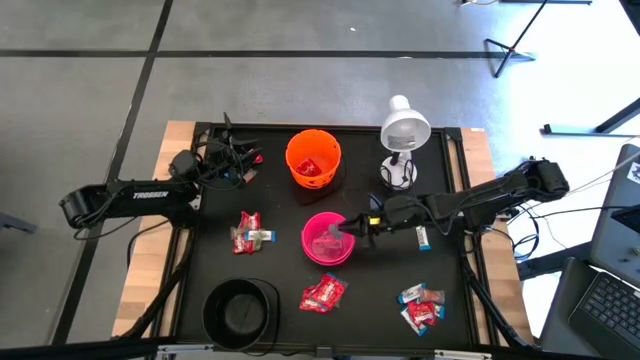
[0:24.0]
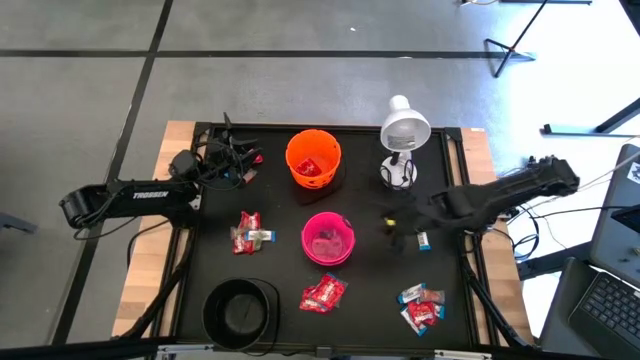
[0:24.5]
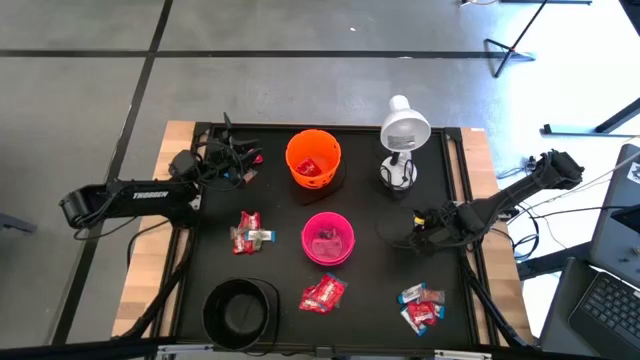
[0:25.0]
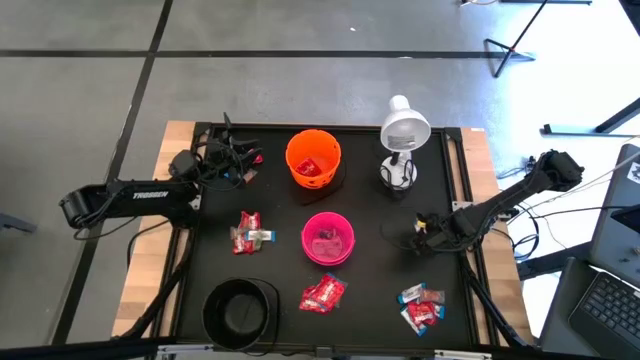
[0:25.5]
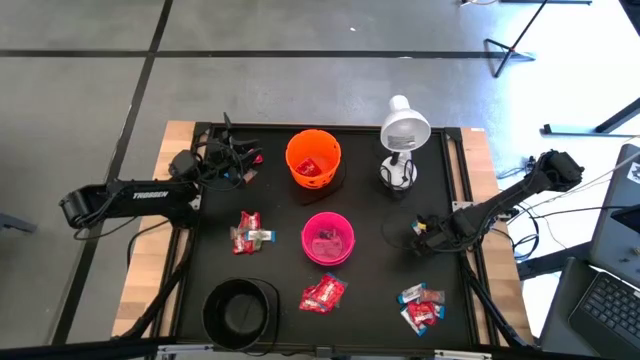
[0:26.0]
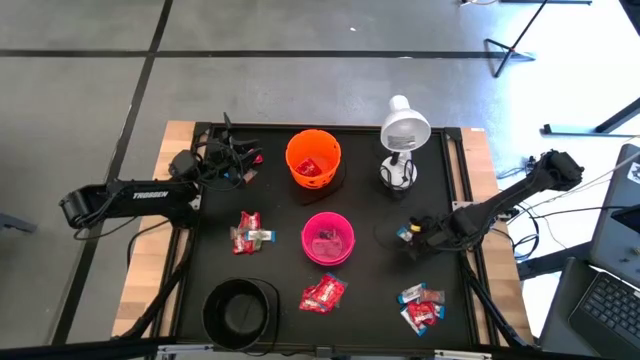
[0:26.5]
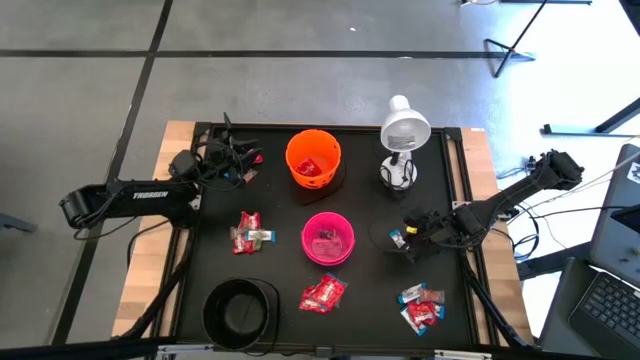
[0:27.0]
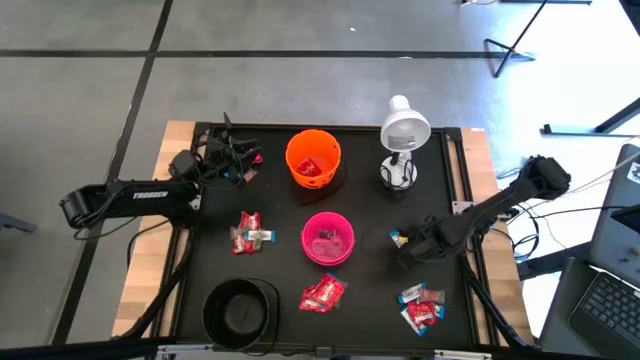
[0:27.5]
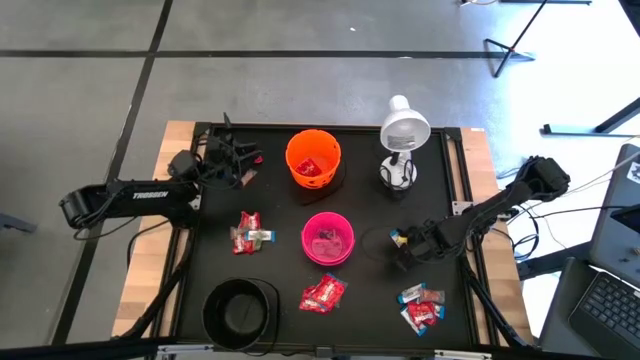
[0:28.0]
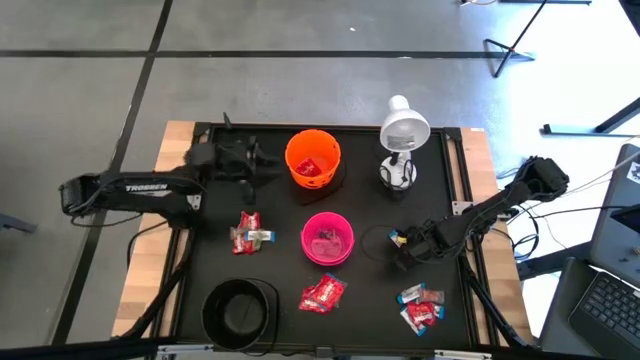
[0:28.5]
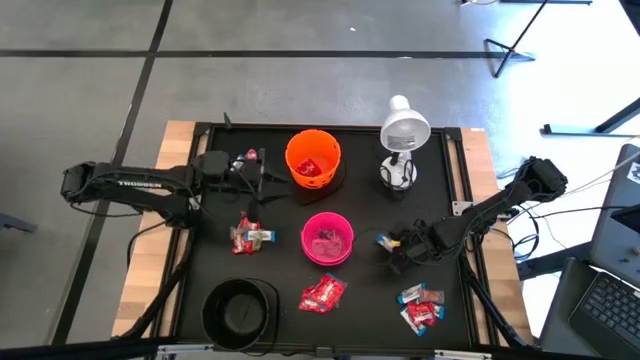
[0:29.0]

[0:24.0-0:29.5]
Task: Sort candy
Put the white chocolate into the black bucket

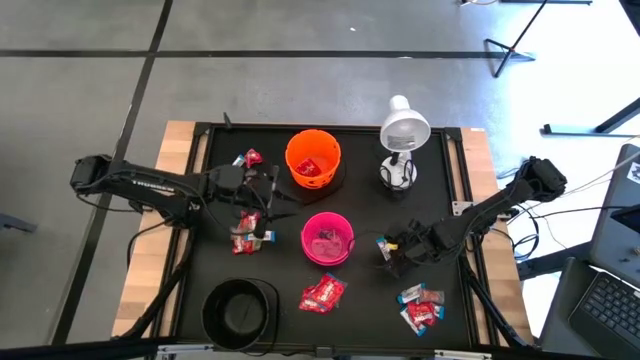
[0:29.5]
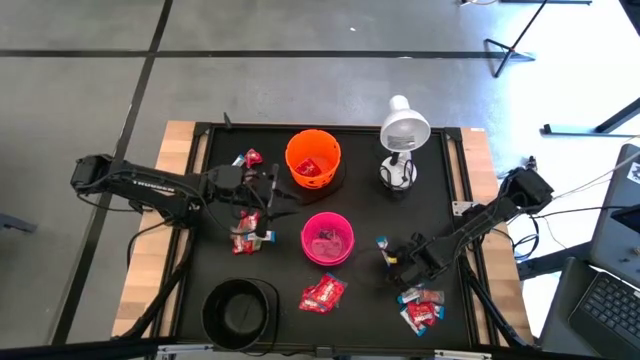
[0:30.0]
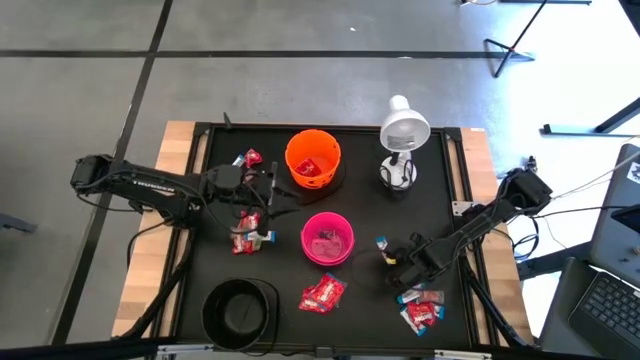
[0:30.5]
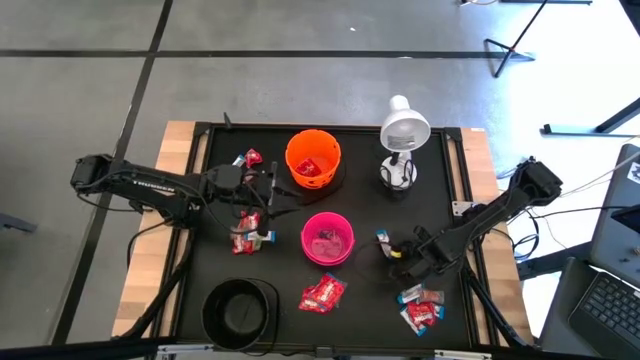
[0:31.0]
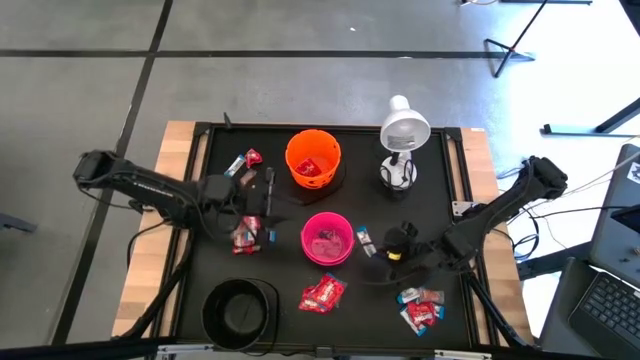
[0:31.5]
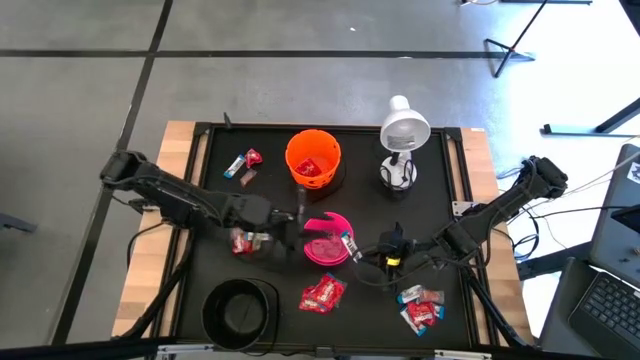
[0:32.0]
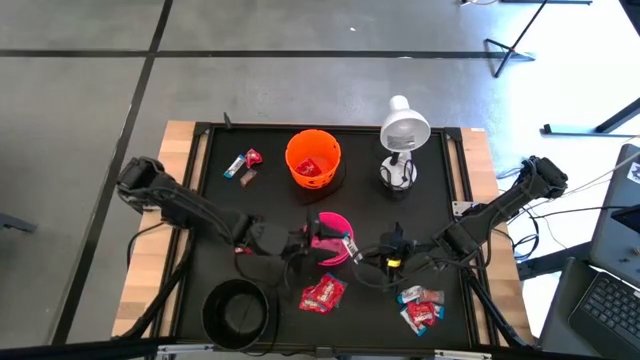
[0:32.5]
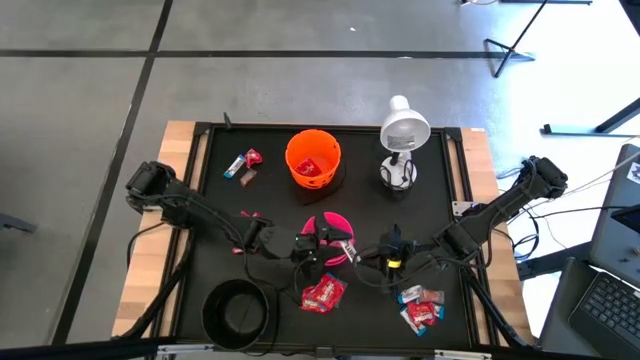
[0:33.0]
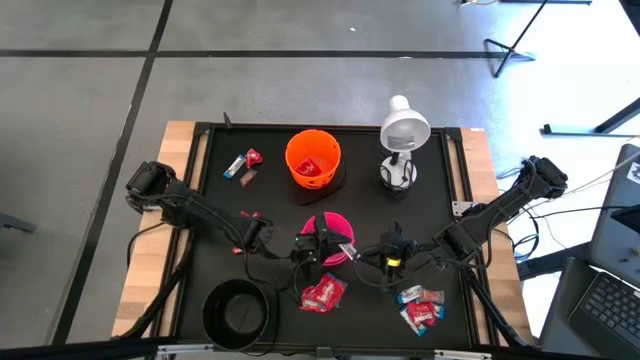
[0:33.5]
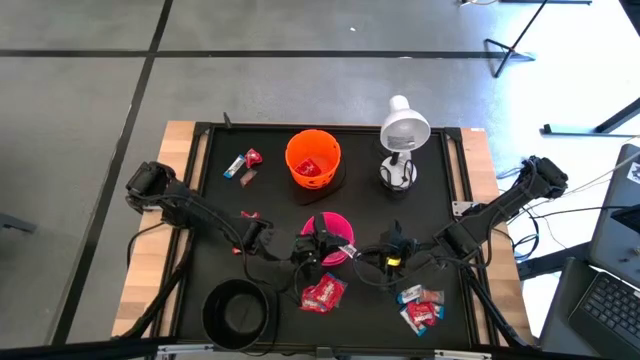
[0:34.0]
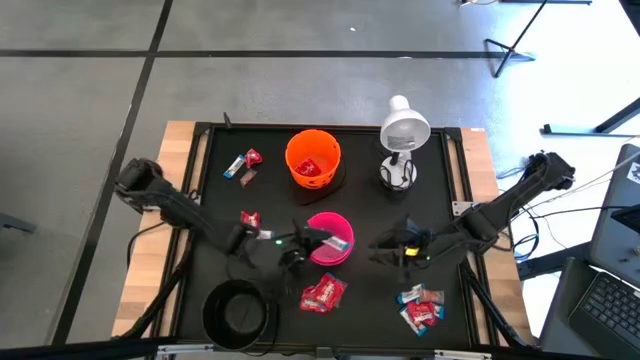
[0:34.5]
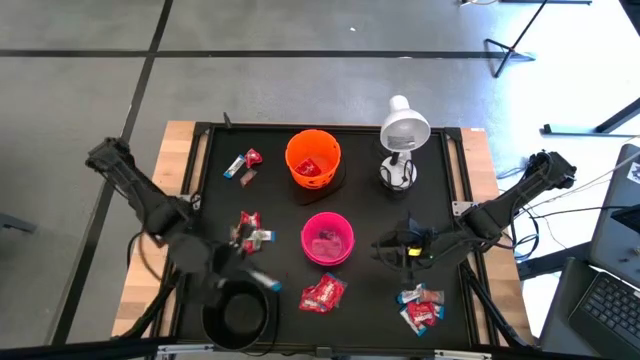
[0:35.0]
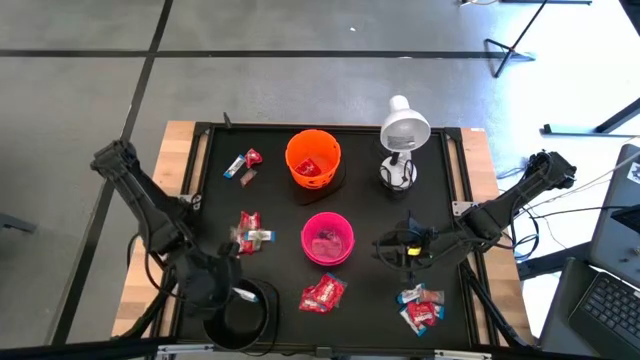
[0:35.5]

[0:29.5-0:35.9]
Put the white chocolate into the black bucket

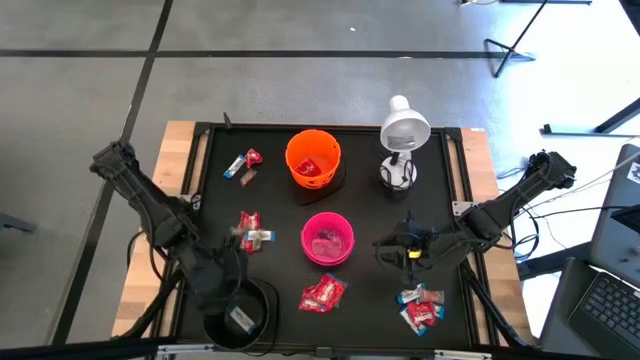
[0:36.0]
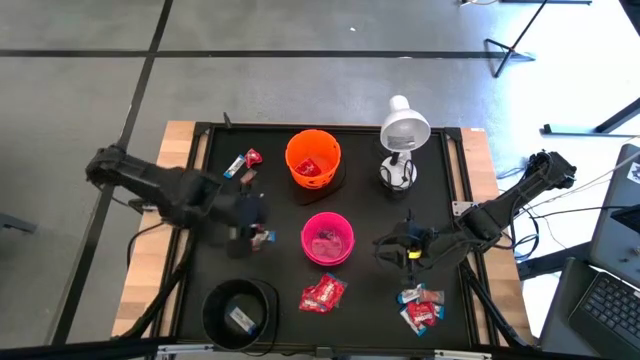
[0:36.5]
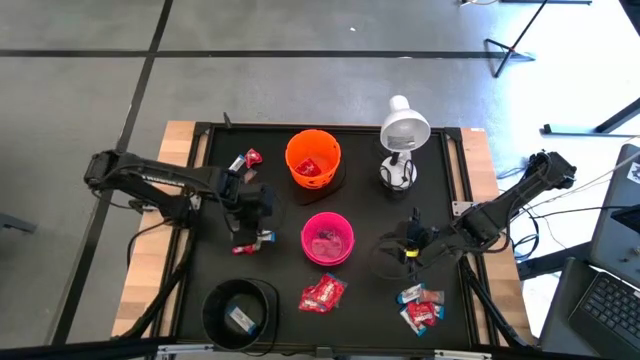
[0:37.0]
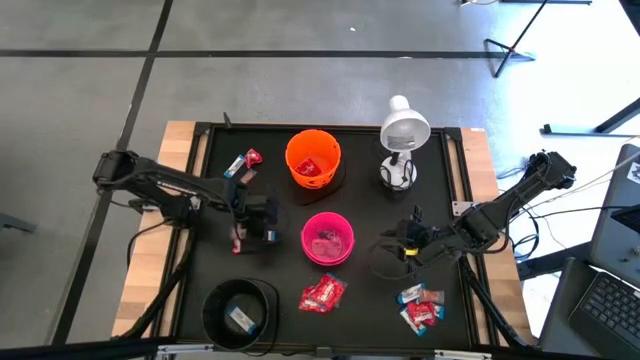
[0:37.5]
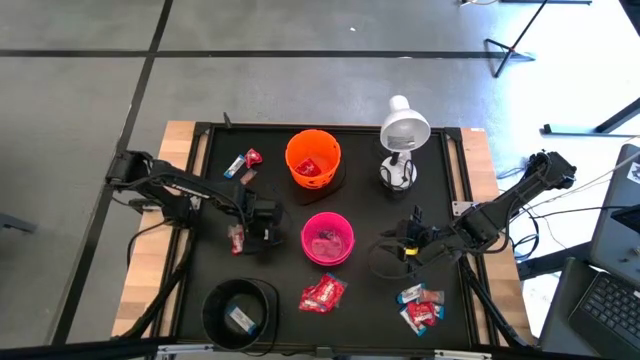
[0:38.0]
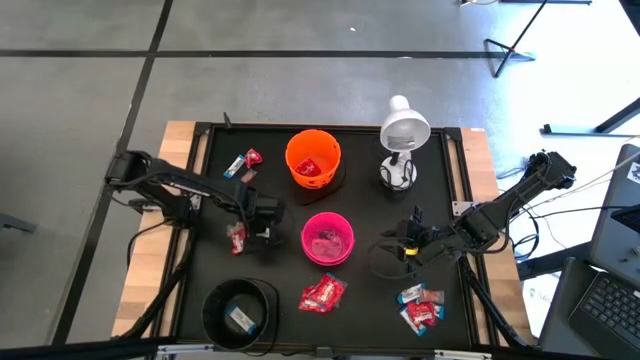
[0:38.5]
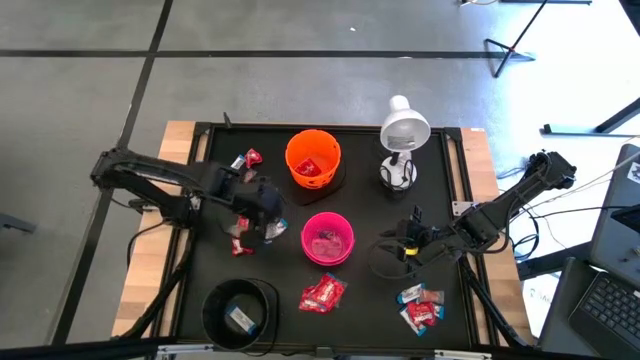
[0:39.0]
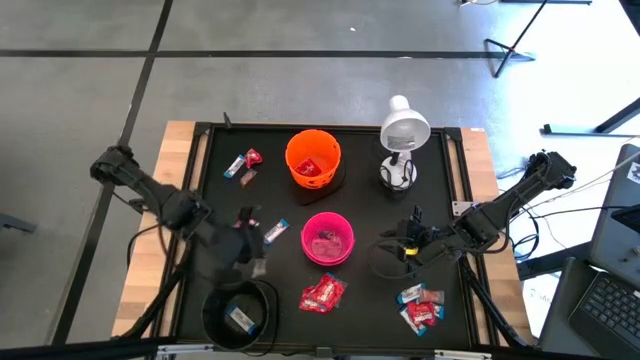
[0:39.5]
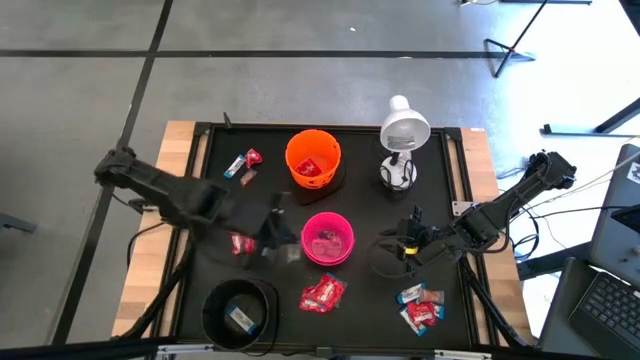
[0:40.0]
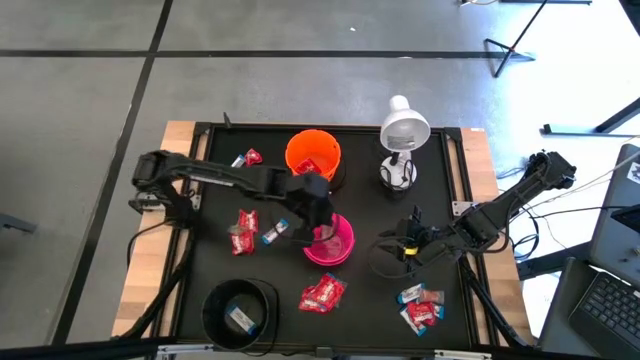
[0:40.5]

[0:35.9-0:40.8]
Put the green gummy into the pink bucket

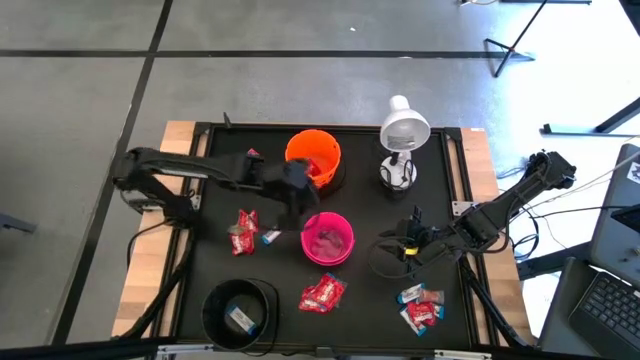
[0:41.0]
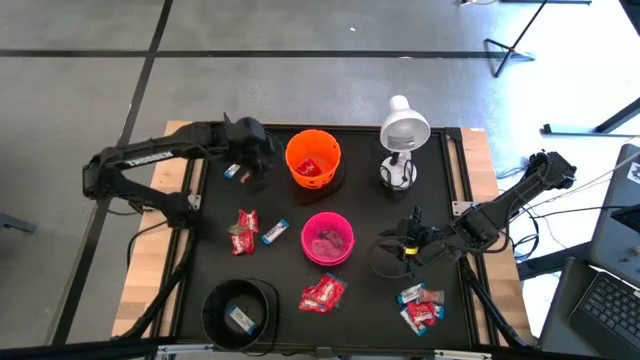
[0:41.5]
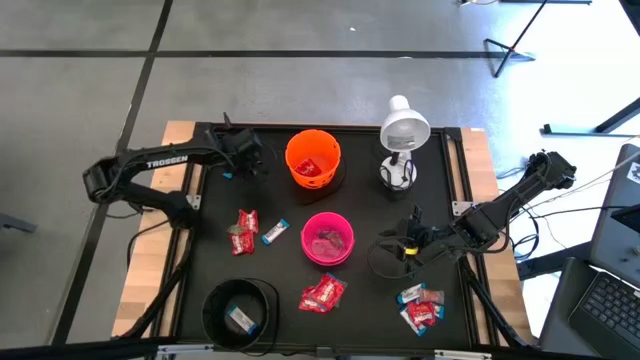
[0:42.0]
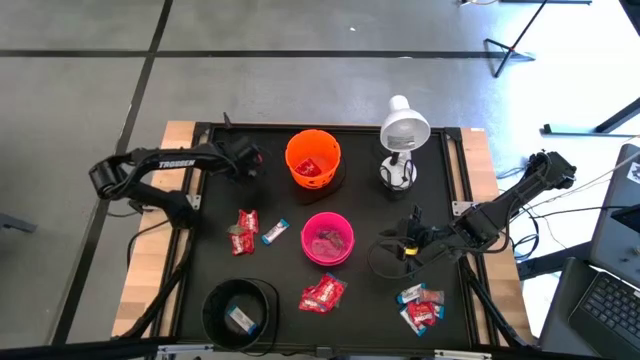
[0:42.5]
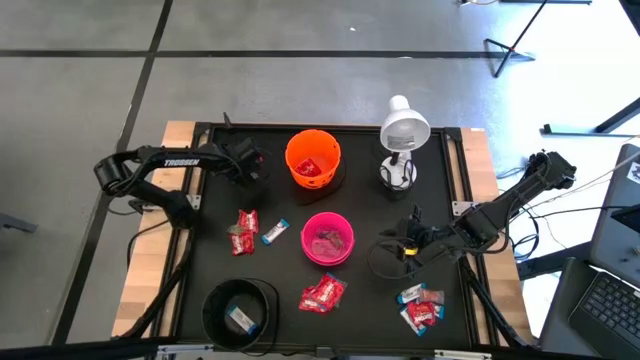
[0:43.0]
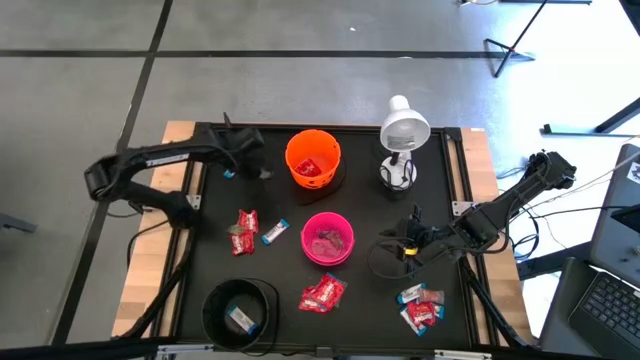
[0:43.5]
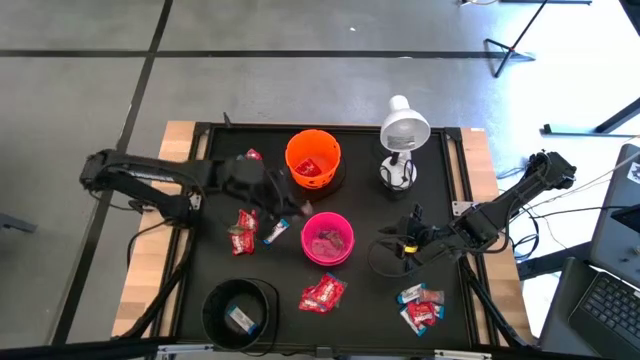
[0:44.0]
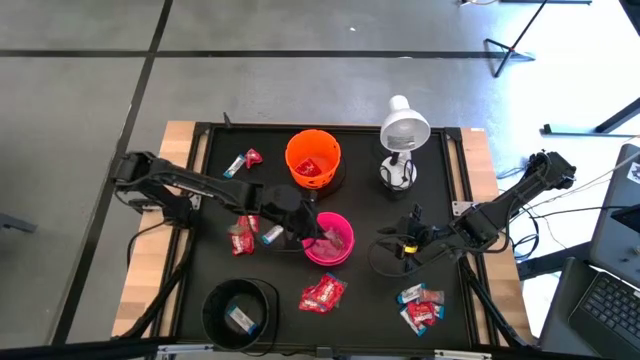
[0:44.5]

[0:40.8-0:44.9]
Put the orange gummy into the pink bucket

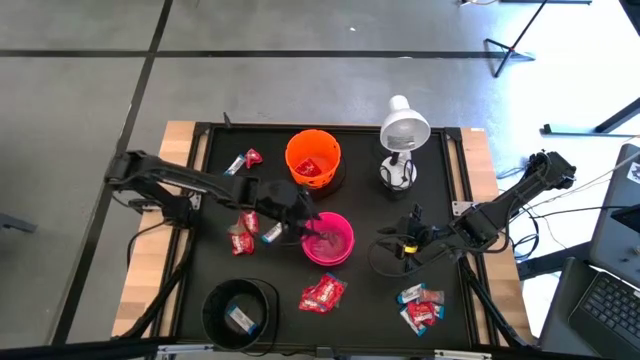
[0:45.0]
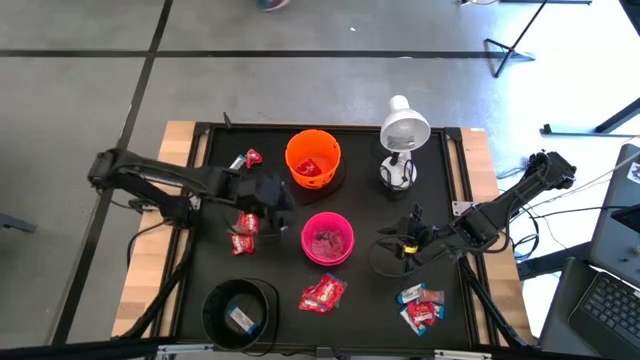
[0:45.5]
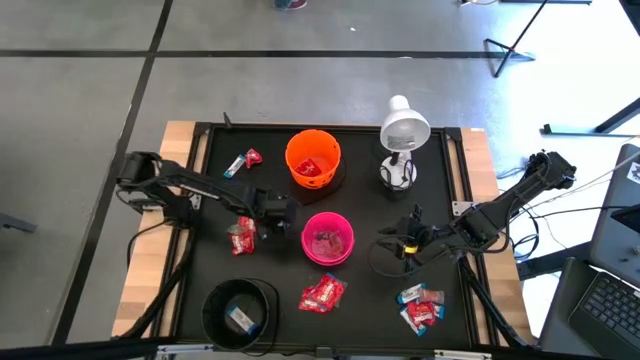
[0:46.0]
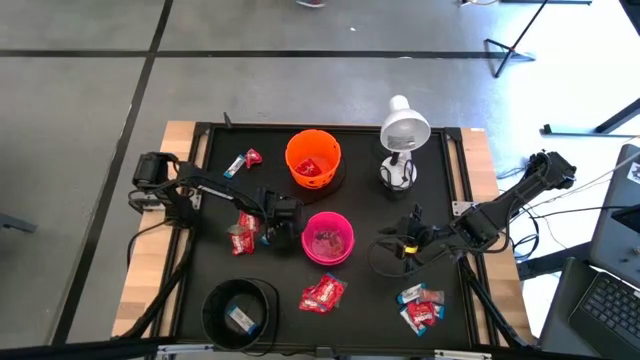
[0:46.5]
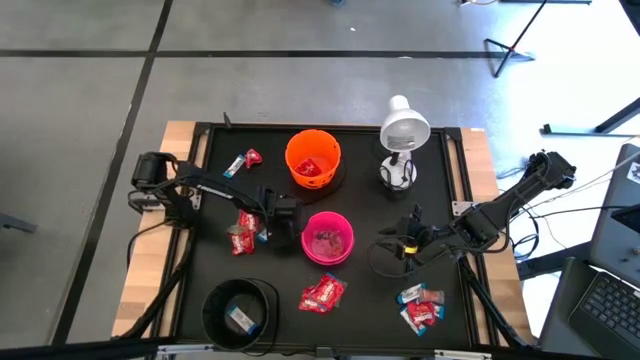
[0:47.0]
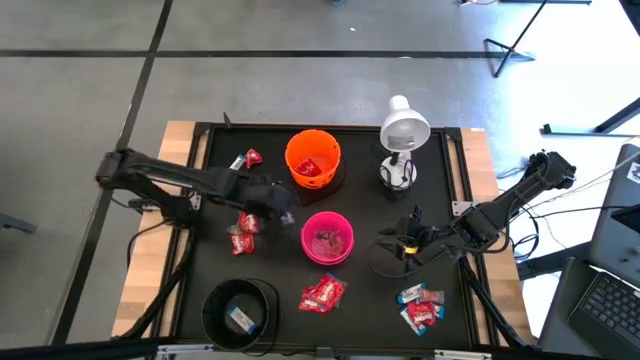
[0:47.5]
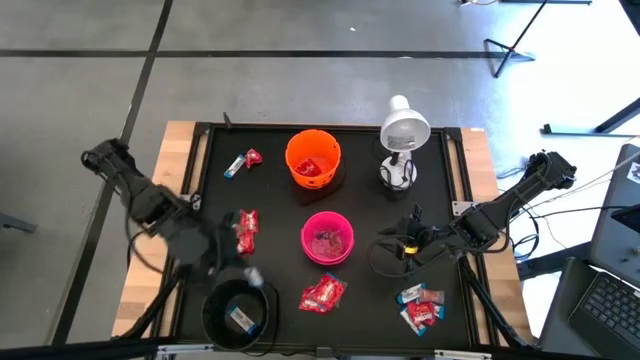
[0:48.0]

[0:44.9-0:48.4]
Put the white chocolate into the black bucket
